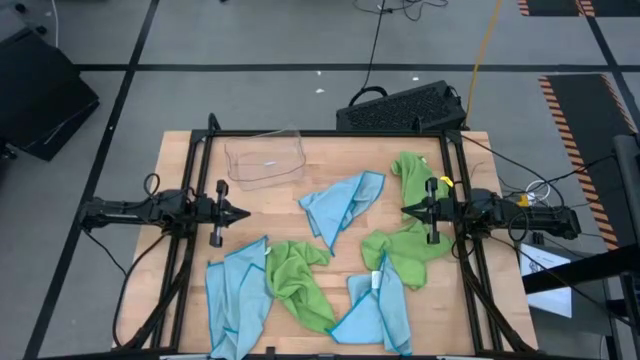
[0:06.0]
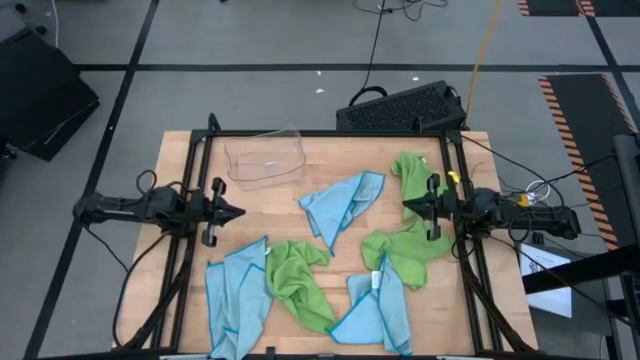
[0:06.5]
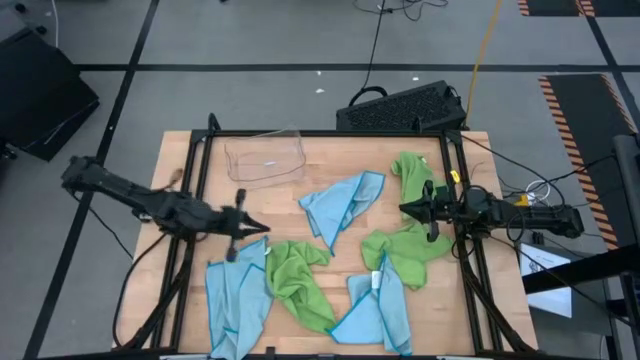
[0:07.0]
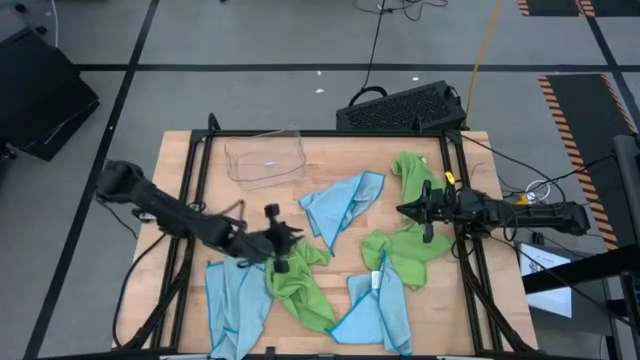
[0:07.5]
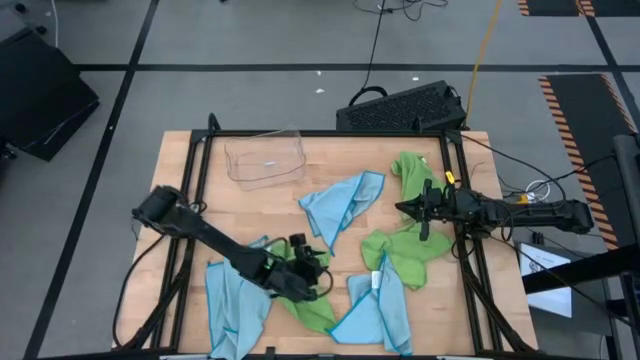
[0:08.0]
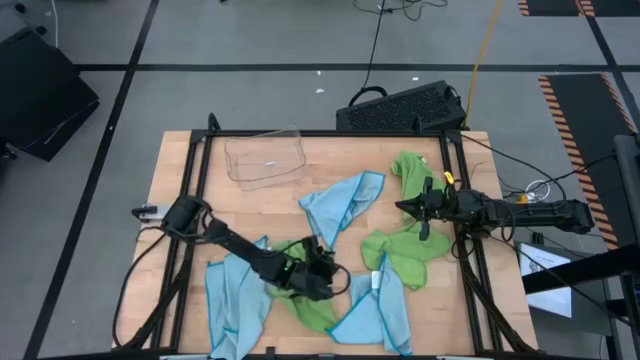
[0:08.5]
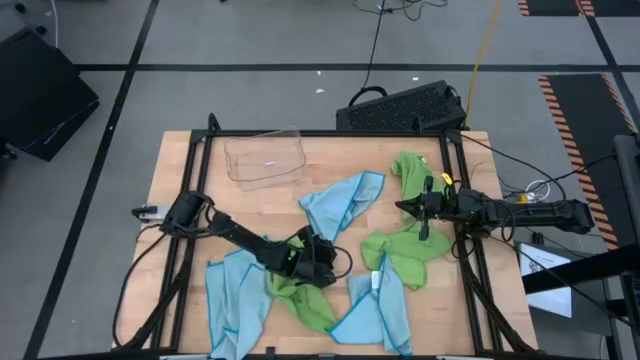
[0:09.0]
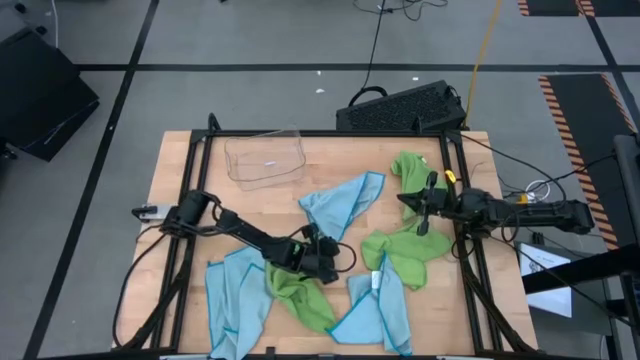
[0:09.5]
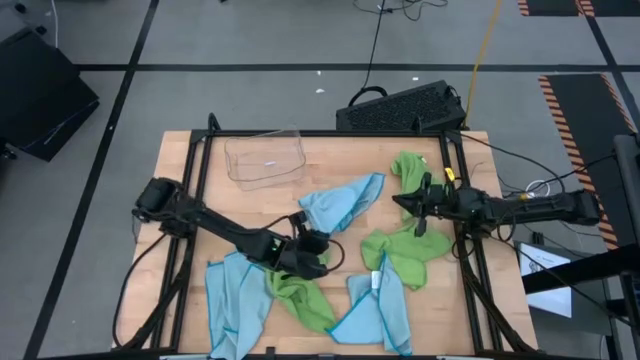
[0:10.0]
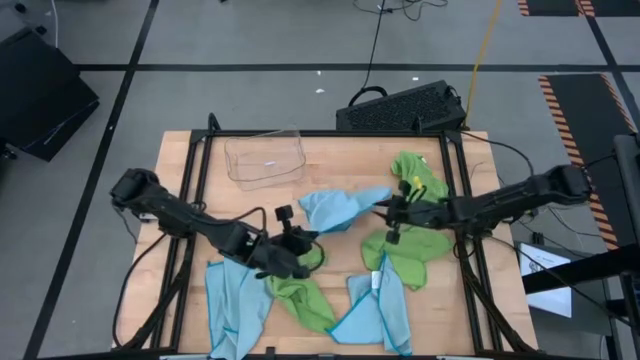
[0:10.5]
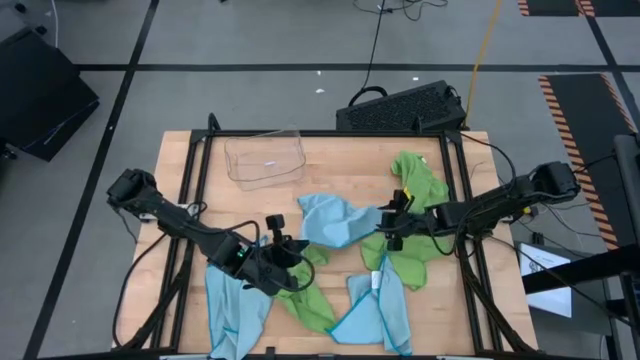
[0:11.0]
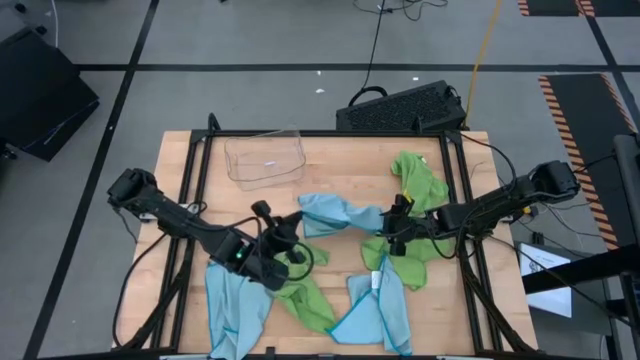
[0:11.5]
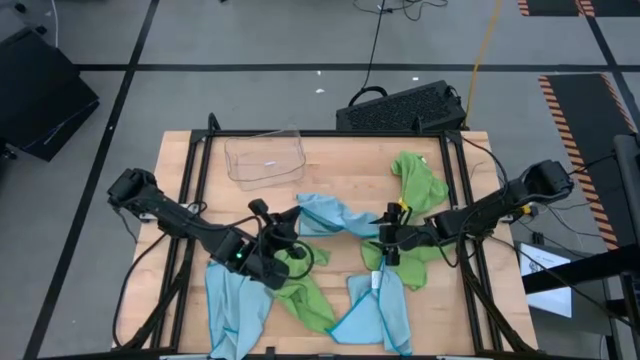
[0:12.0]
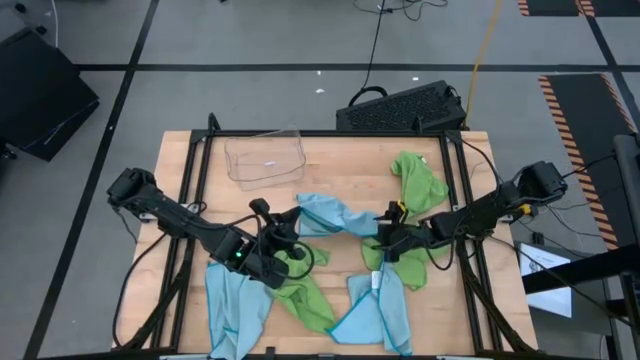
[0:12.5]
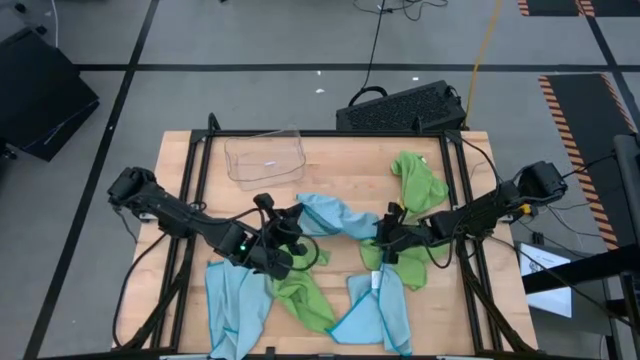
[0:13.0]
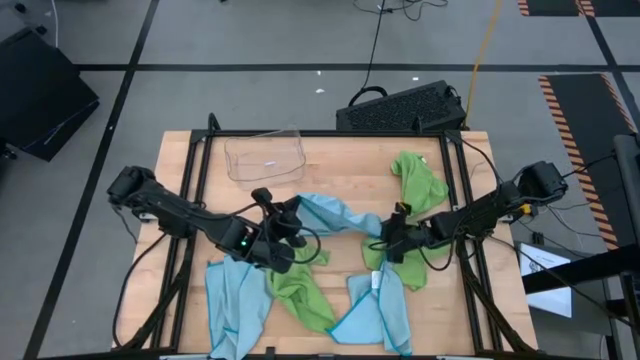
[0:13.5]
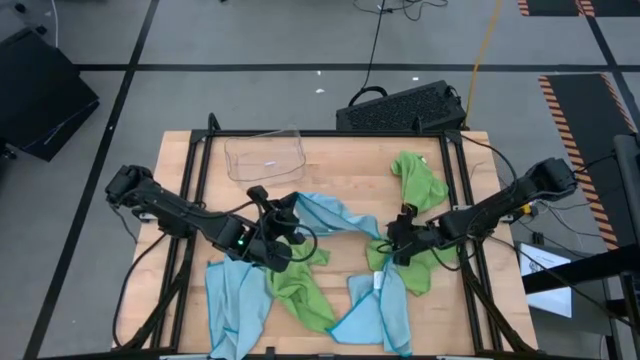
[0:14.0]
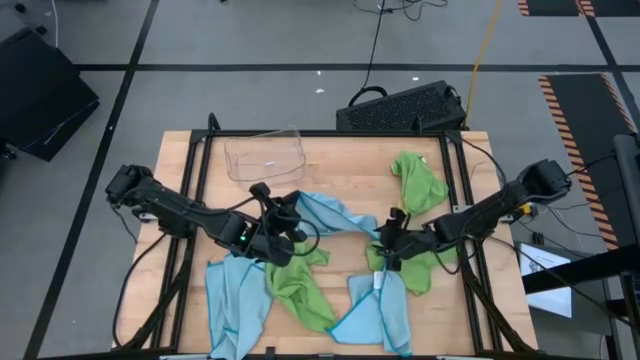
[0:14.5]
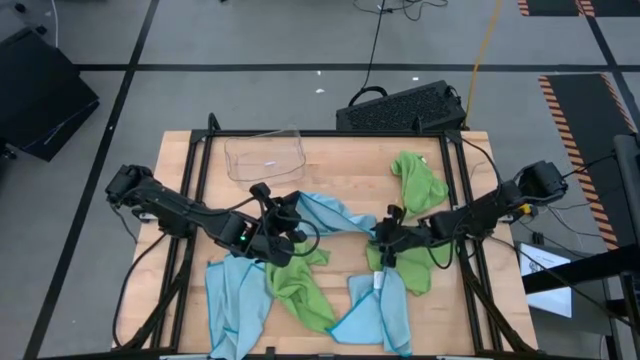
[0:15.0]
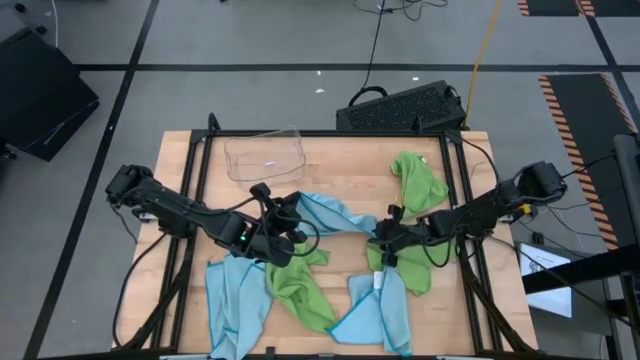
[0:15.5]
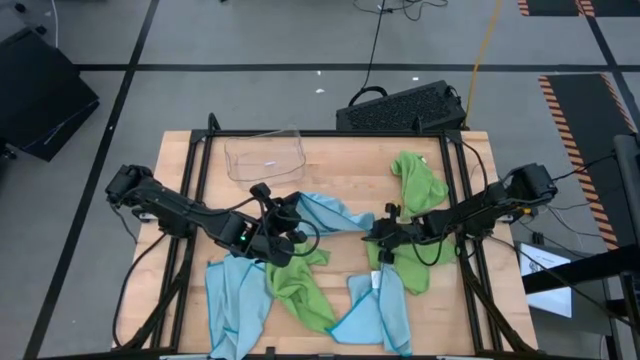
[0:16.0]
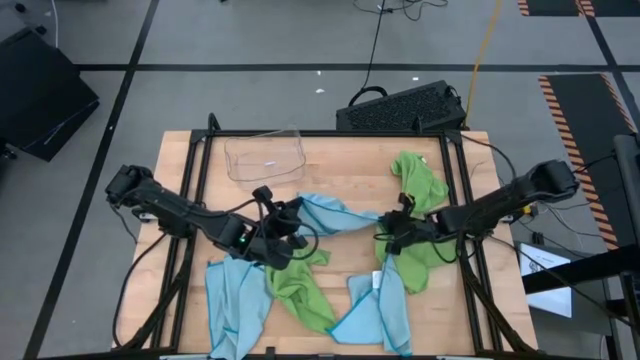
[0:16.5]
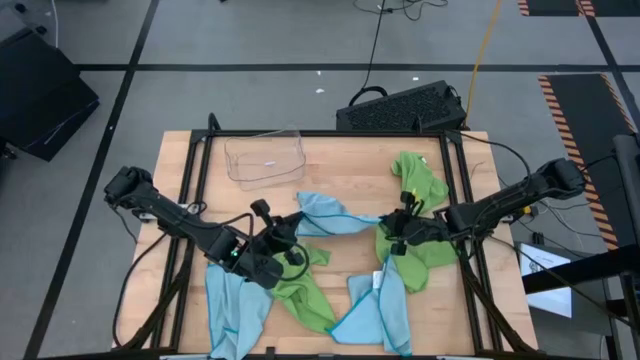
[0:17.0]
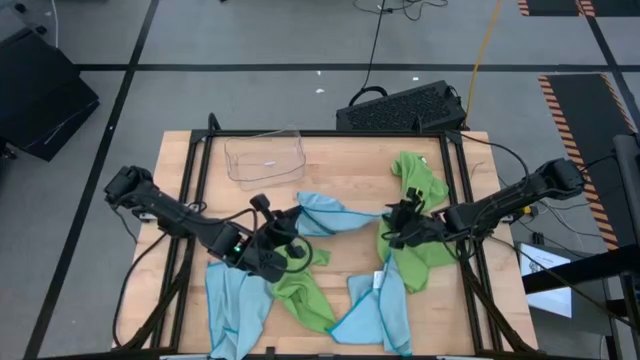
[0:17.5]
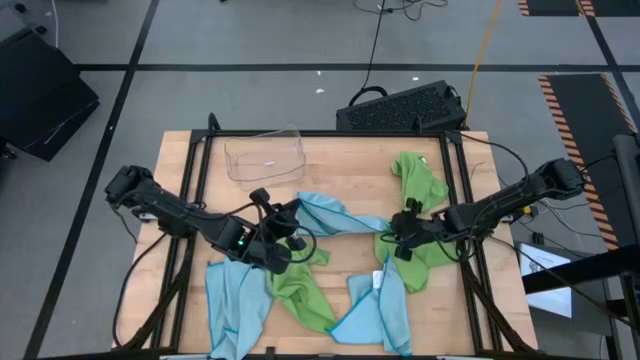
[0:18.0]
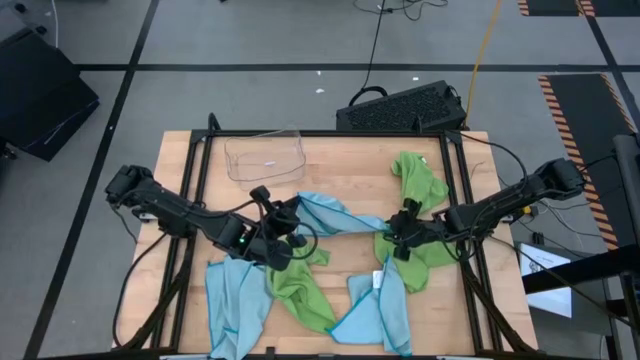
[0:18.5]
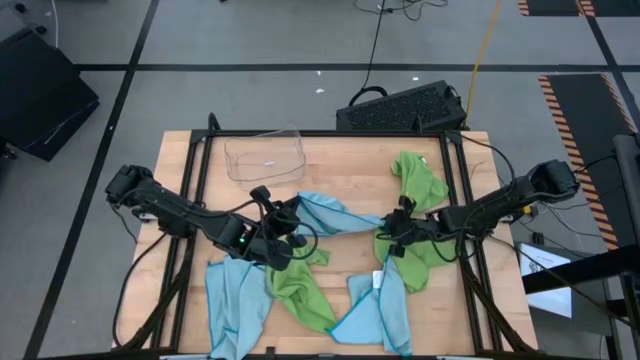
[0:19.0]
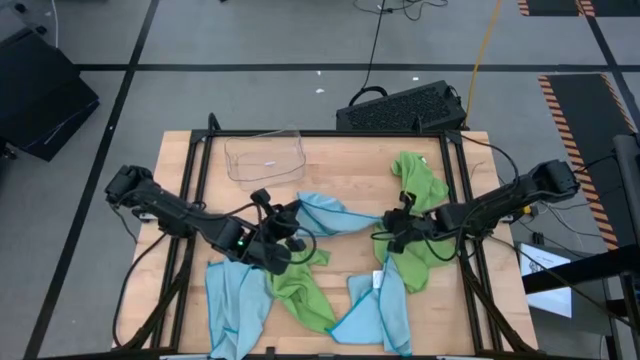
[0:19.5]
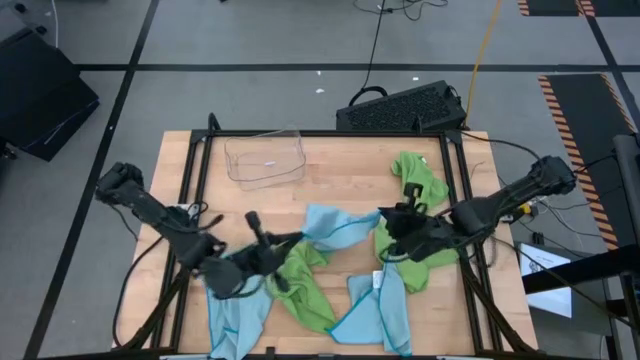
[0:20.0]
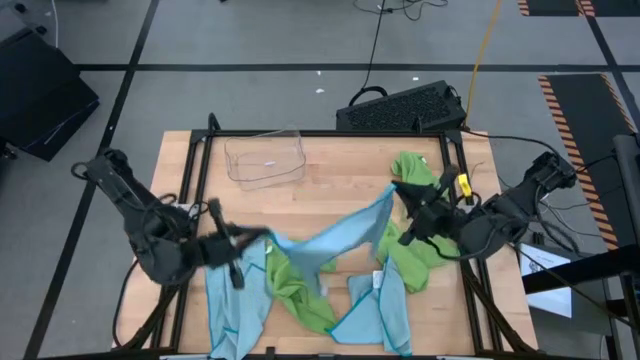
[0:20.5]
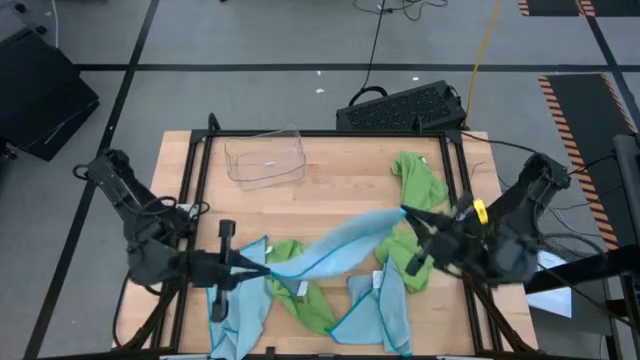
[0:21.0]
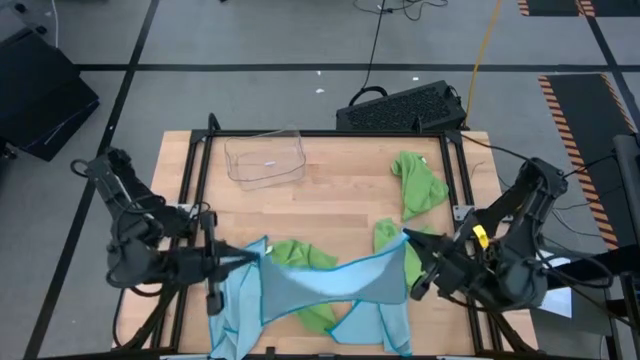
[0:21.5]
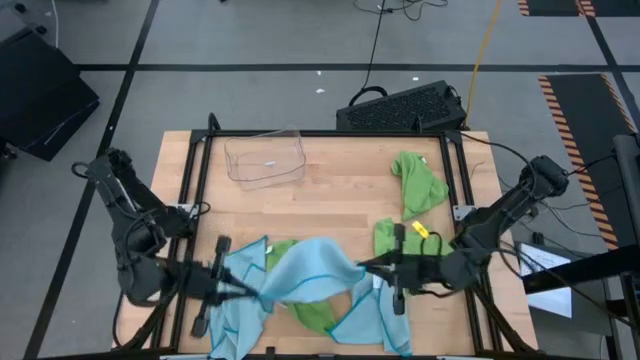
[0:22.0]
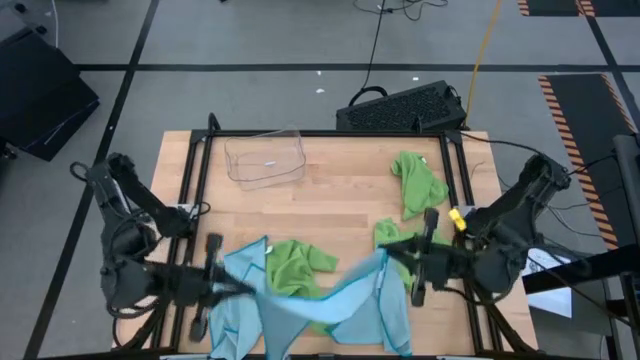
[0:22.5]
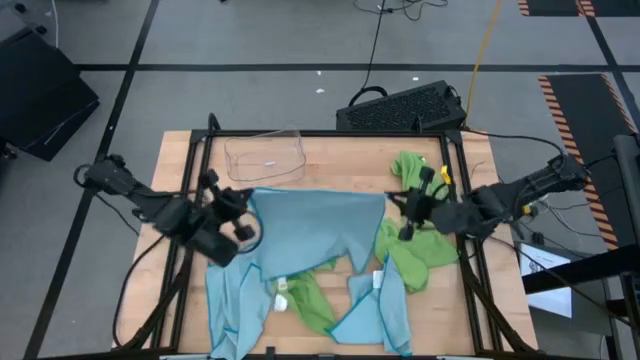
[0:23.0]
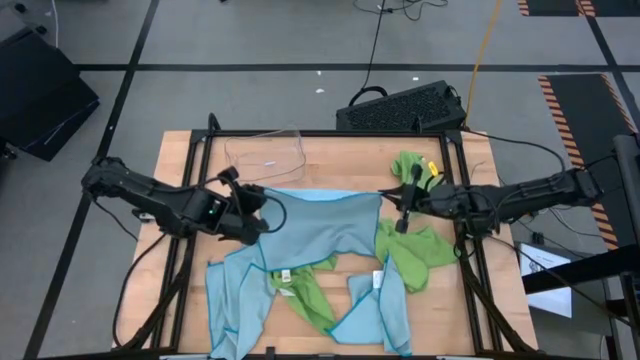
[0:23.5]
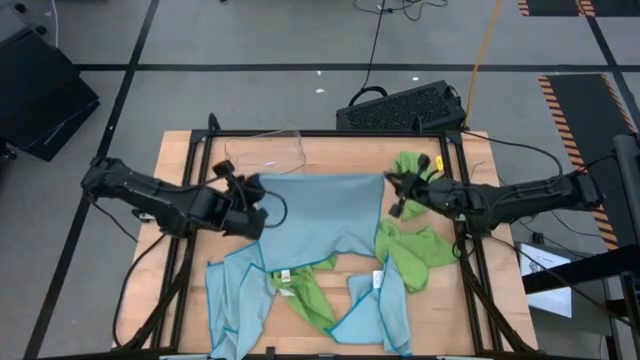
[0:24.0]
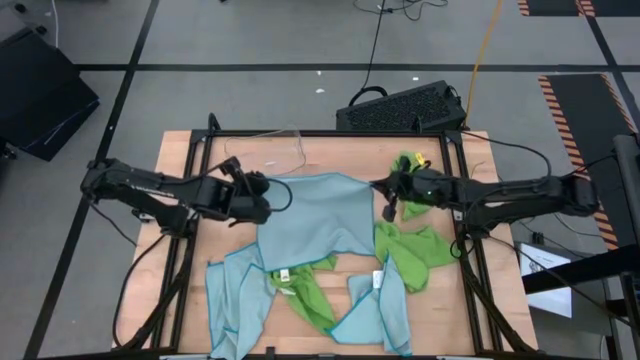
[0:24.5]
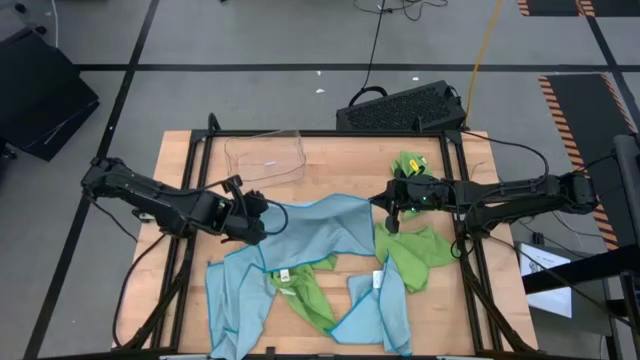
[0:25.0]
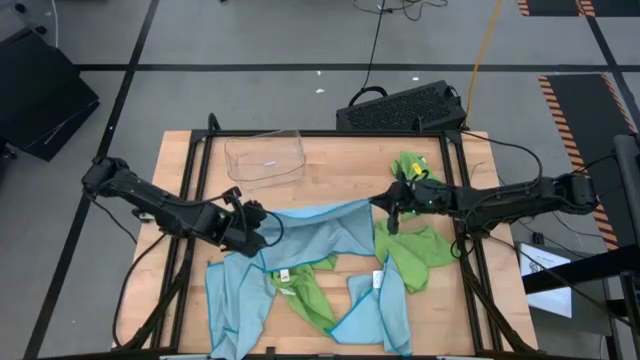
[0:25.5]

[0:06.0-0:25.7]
Task: Fold microfiber towels
Fold the top center blue microfiber cloth
